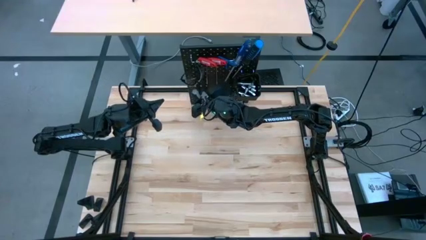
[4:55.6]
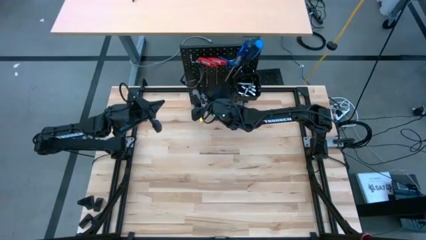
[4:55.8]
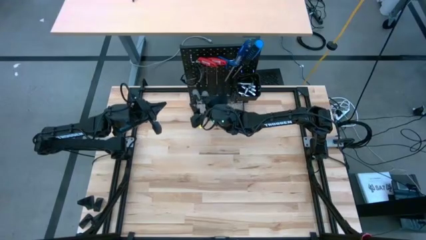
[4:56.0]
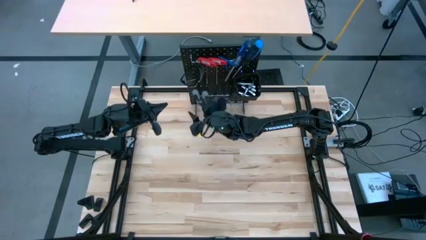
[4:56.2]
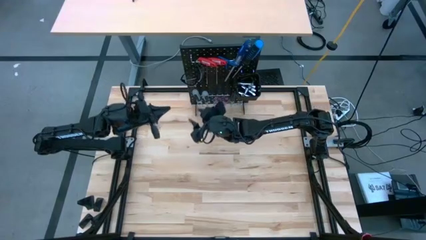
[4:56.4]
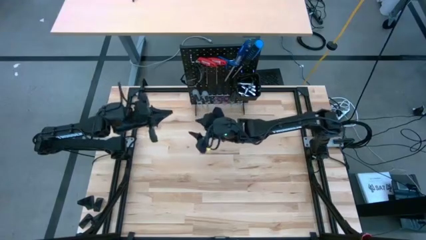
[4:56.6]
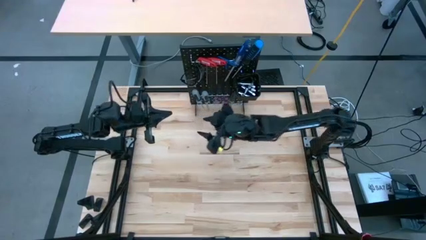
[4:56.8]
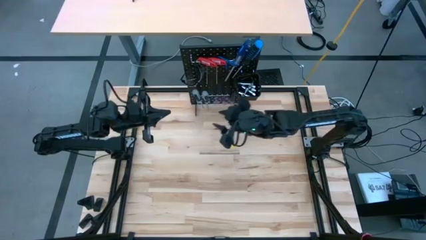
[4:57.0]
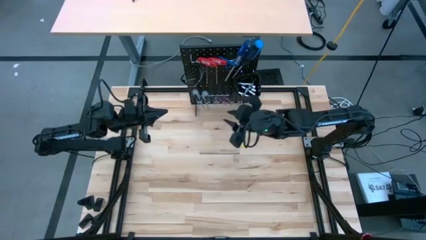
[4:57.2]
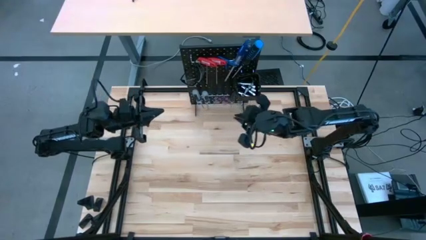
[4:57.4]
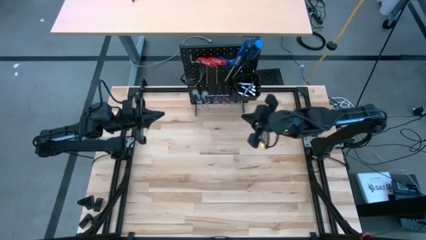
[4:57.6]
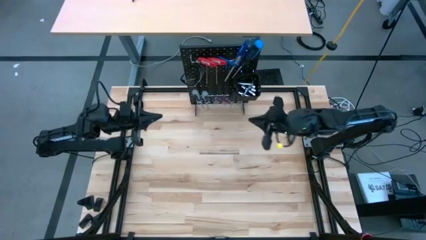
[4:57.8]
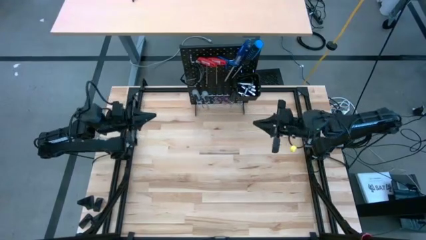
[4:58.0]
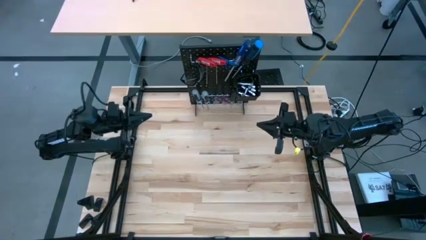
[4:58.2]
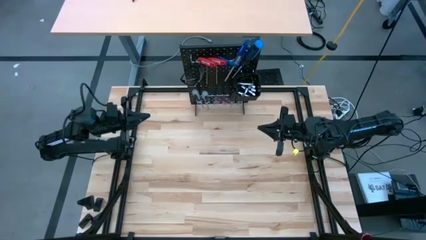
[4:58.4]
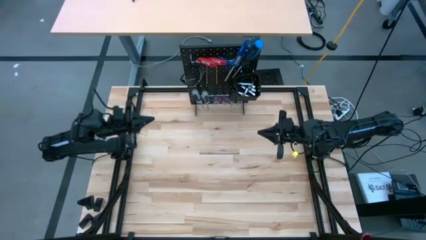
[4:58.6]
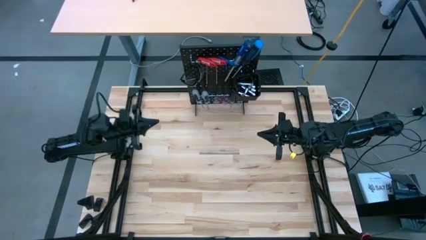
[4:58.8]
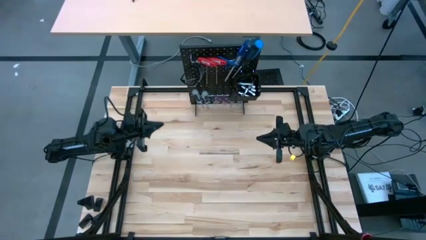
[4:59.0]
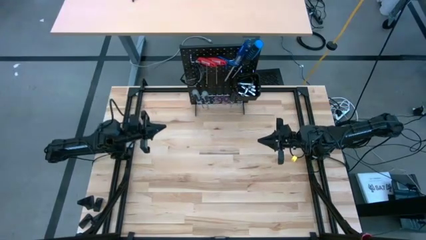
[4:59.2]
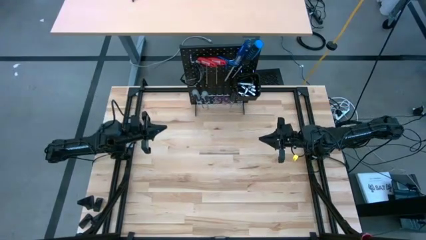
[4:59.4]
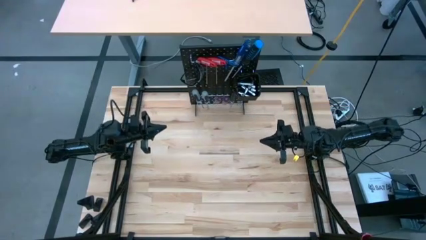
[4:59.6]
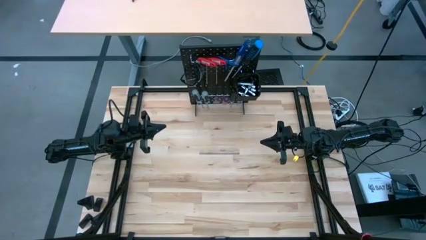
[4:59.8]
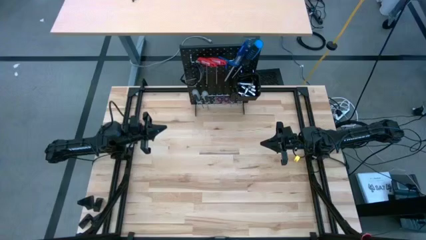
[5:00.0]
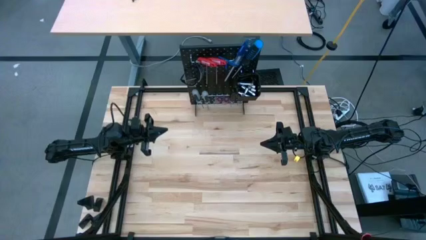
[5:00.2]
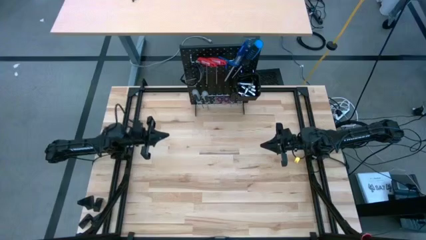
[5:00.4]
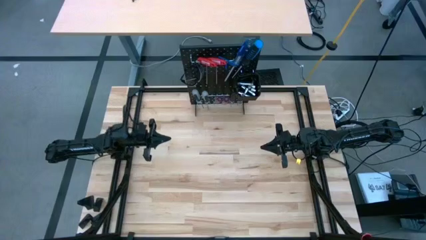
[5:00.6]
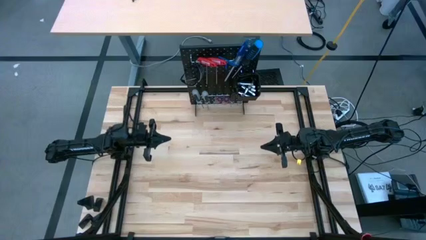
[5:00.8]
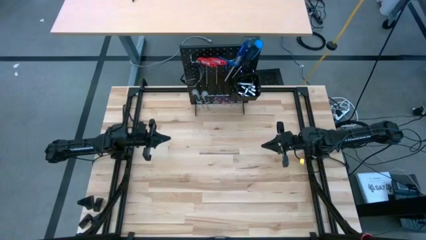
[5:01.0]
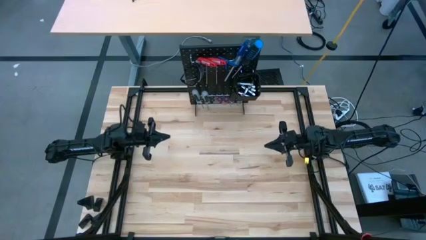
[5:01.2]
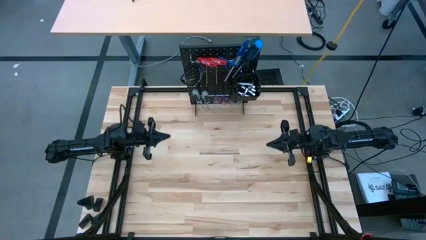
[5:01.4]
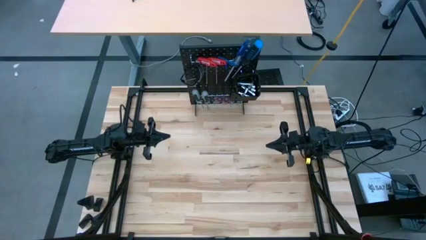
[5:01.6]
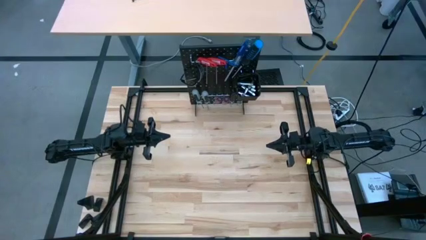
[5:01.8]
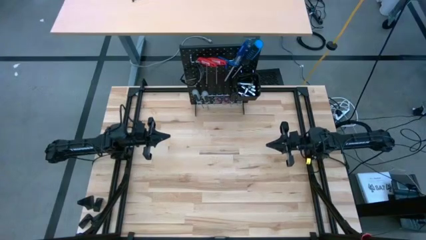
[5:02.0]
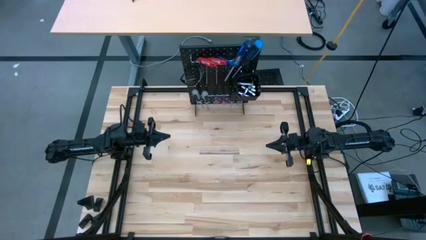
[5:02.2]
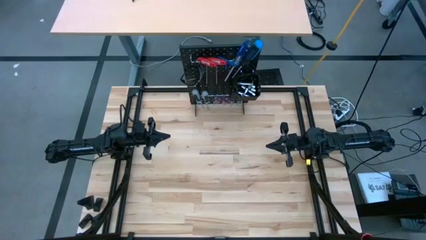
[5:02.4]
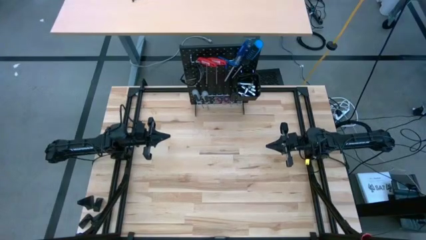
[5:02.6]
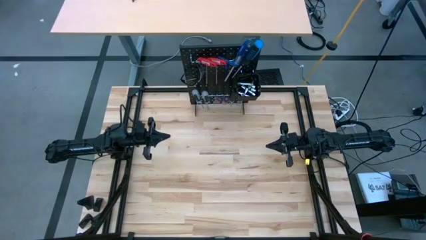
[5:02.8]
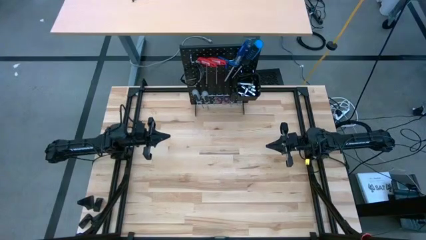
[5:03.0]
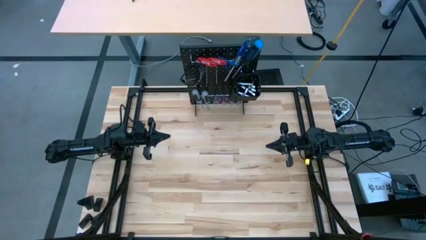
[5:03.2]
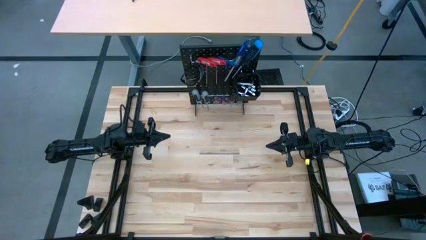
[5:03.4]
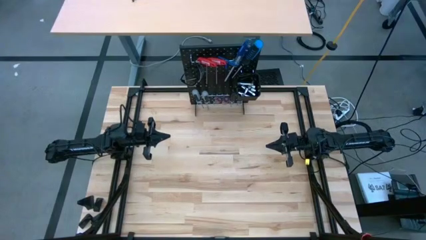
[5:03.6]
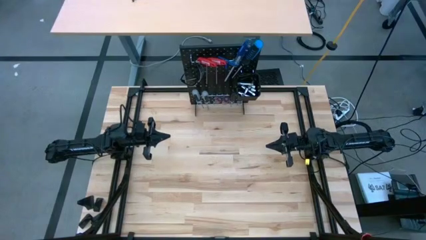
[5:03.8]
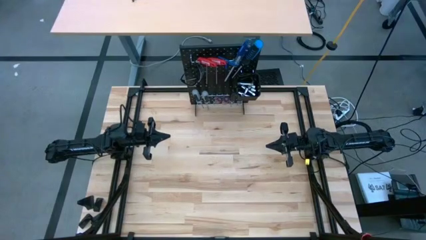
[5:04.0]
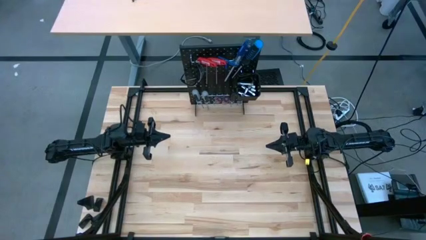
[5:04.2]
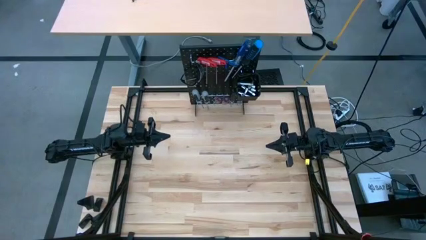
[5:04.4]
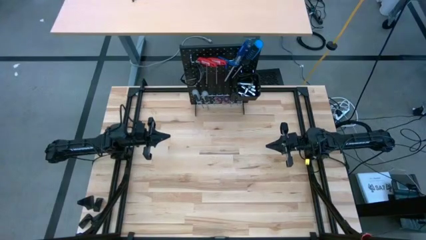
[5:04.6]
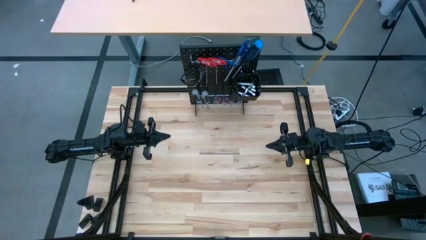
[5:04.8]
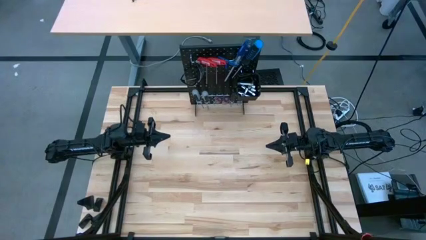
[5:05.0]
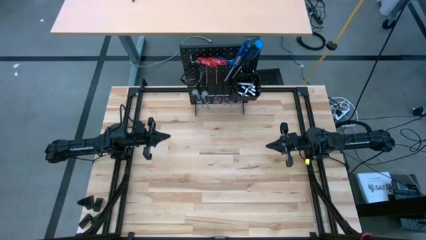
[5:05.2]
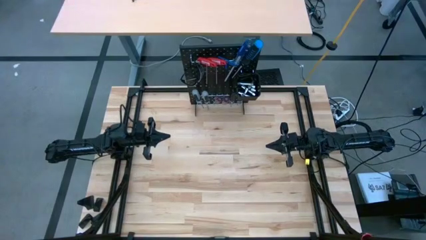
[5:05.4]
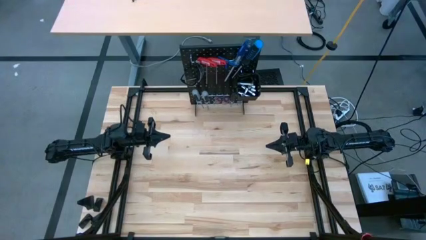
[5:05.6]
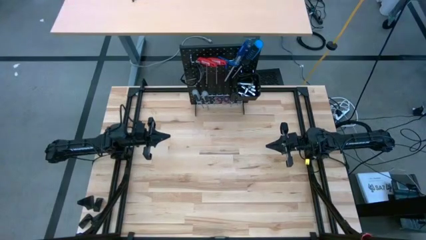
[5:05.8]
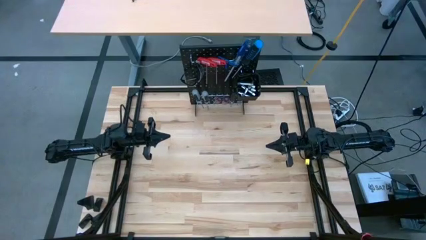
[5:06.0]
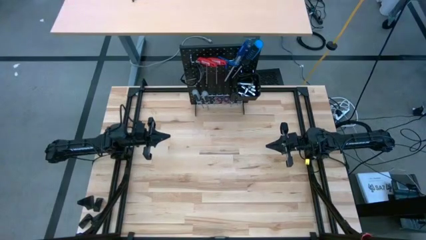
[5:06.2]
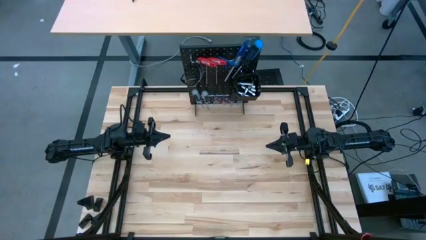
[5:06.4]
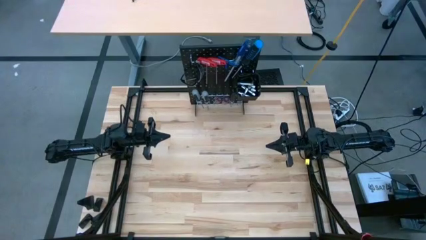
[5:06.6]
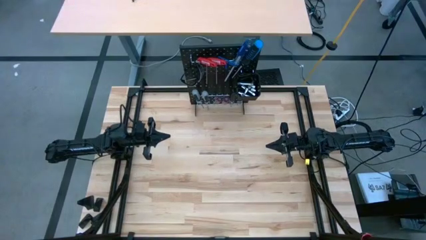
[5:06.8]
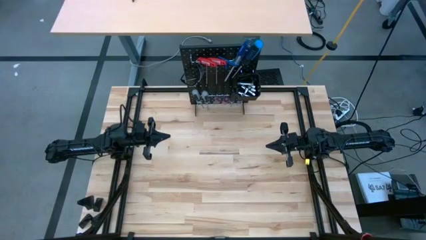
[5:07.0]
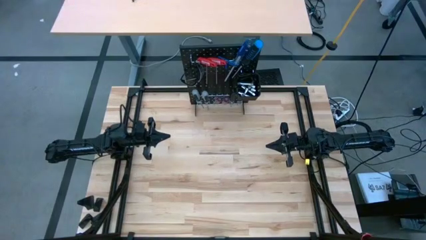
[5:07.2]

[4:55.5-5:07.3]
Task: Hang tools onto peg board
Return to Home Position

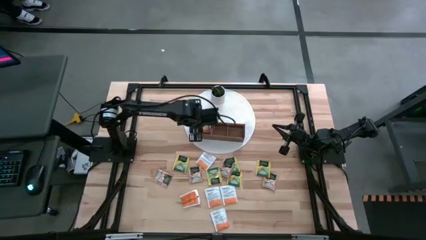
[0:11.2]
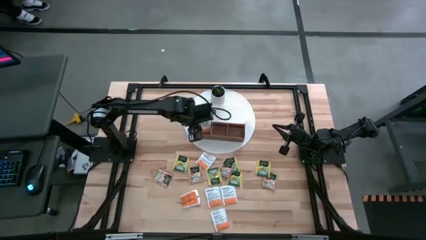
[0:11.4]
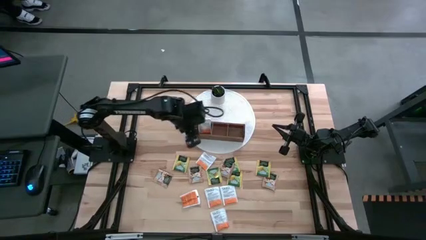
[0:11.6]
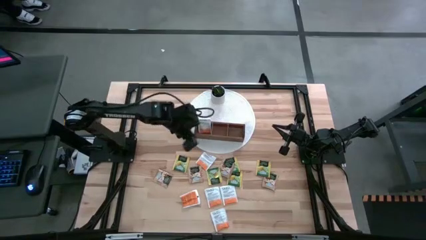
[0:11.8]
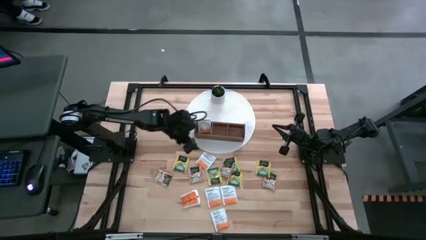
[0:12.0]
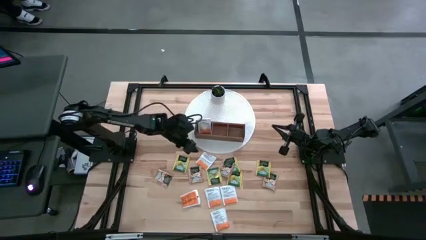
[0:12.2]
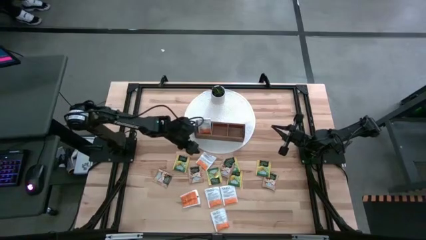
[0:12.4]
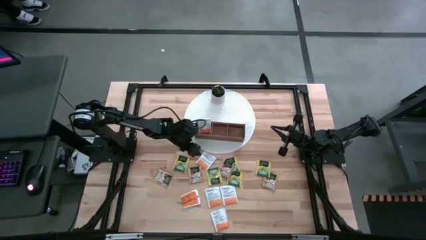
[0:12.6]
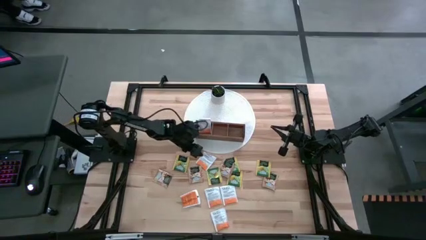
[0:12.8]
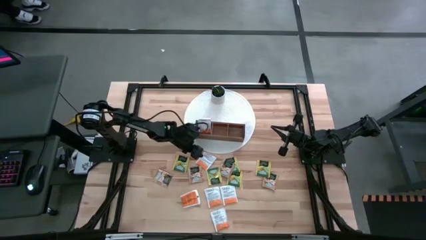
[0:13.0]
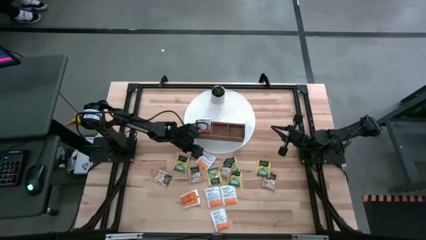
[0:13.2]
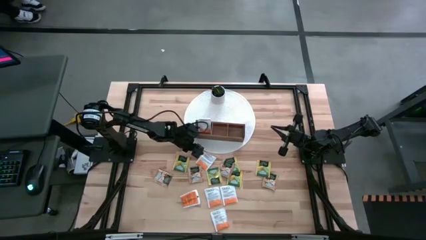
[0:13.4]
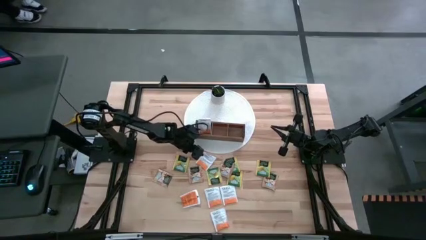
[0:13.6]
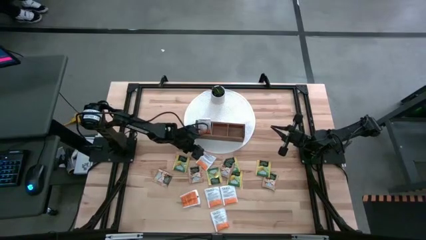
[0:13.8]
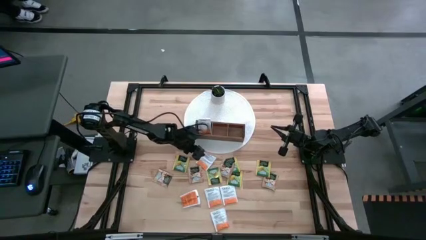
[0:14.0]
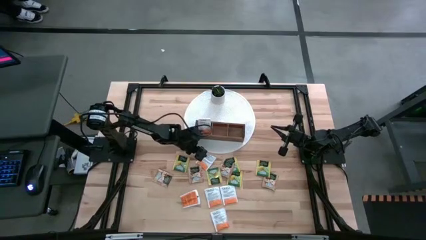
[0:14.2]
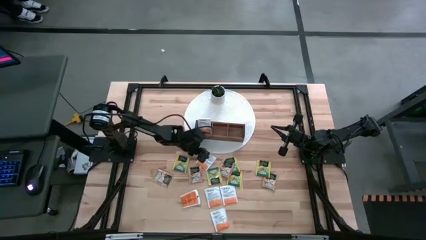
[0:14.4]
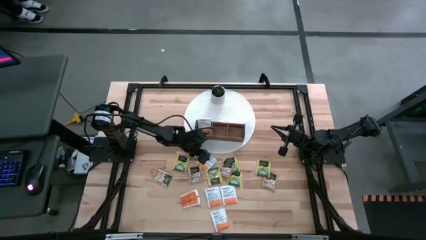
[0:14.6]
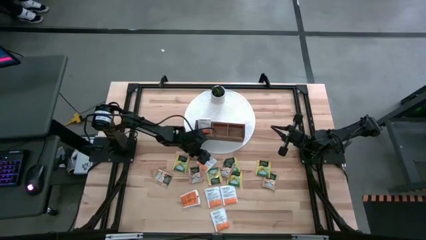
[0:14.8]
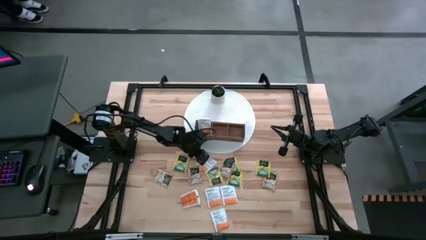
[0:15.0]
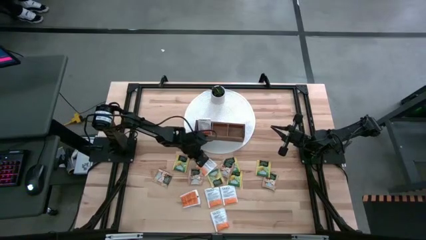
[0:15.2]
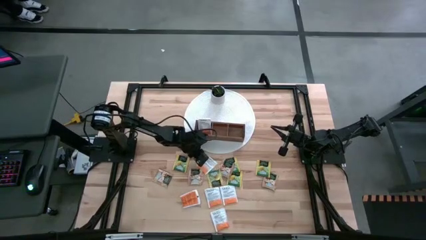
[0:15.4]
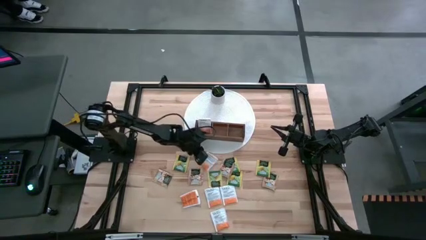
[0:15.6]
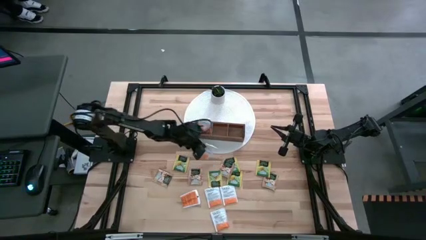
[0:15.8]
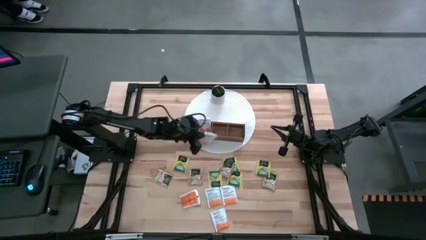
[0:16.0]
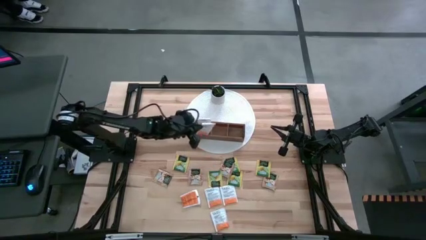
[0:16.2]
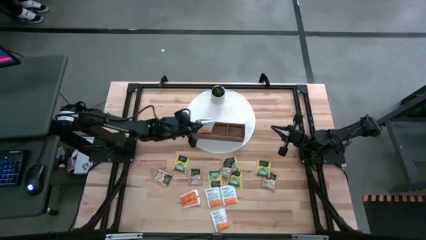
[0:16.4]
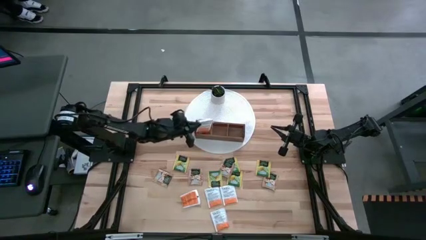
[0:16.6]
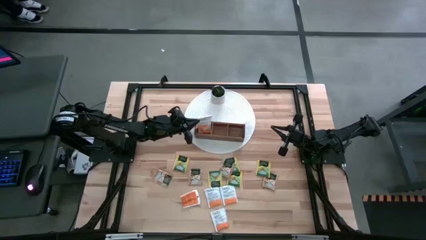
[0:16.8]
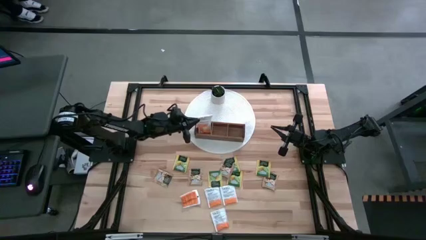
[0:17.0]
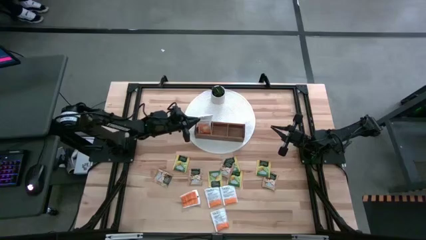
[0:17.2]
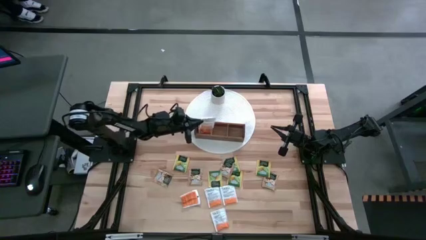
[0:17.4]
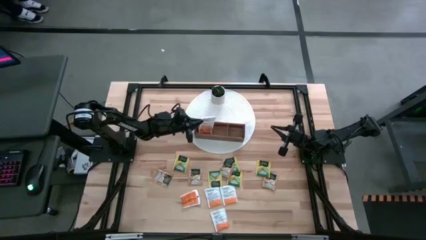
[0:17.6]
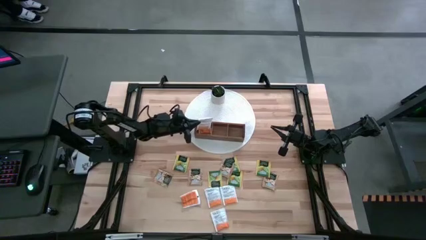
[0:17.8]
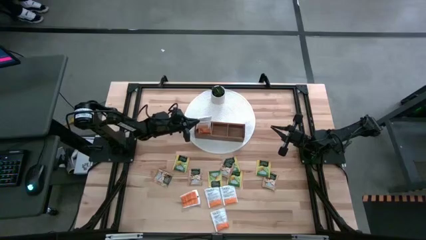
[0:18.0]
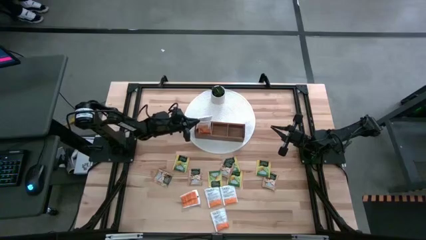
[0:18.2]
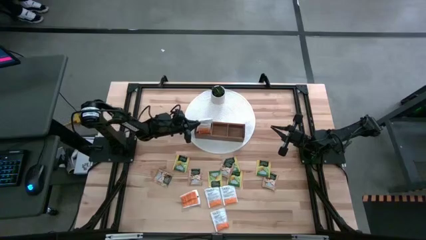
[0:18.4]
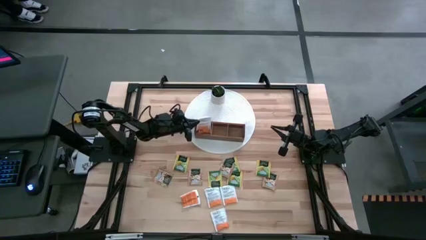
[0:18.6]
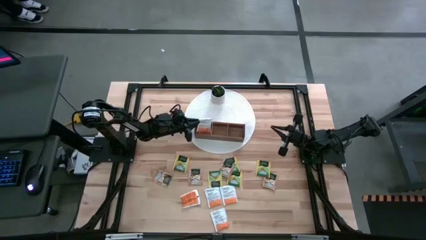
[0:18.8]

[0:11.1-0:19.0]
Task: Pick & Place Tea
Put the white tea bag into the left section of the wooden organizer
